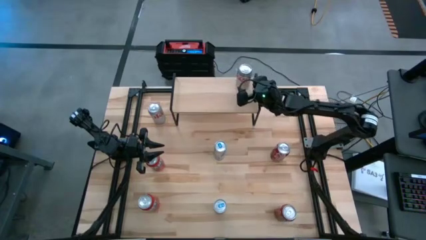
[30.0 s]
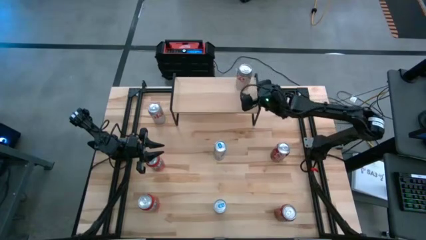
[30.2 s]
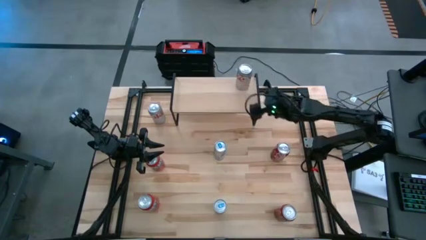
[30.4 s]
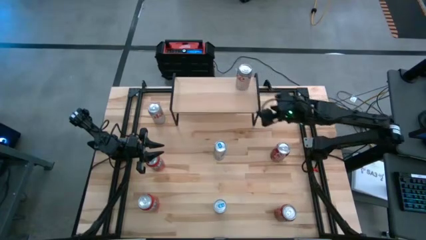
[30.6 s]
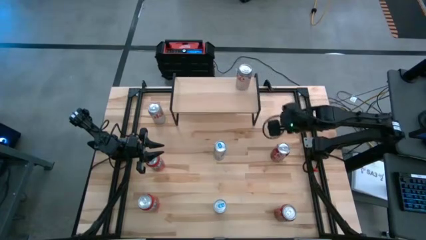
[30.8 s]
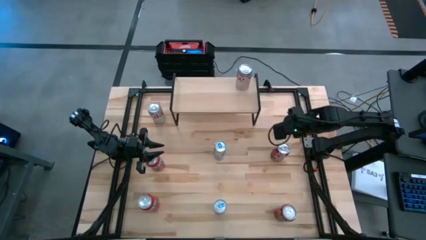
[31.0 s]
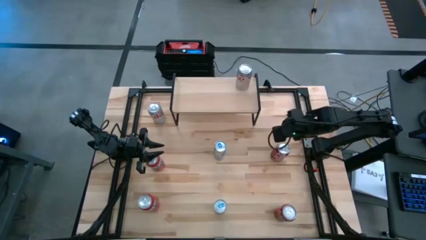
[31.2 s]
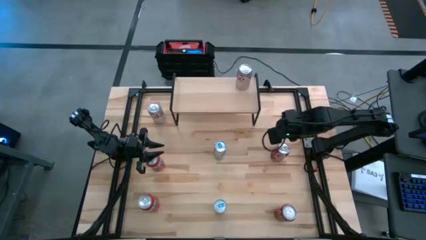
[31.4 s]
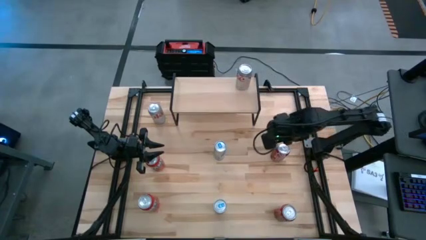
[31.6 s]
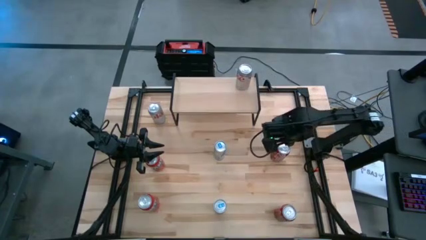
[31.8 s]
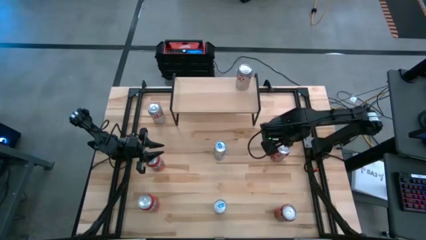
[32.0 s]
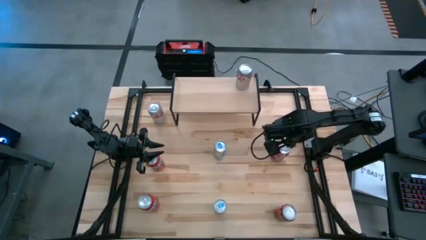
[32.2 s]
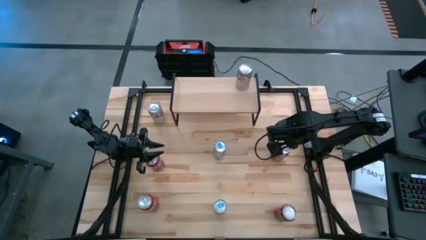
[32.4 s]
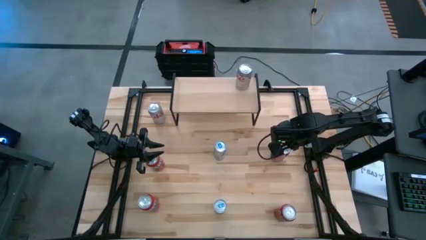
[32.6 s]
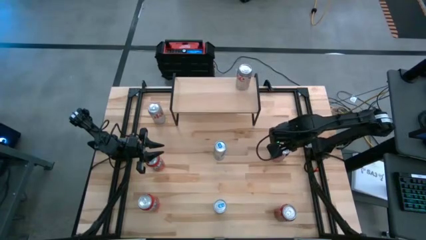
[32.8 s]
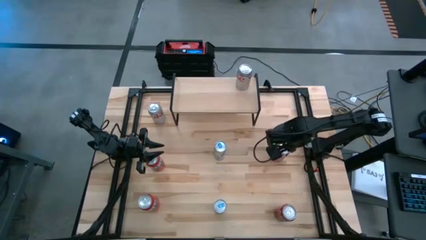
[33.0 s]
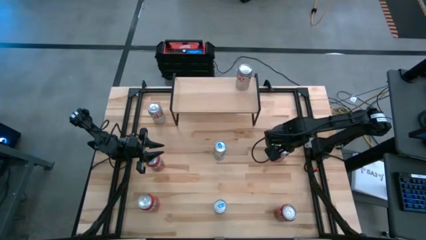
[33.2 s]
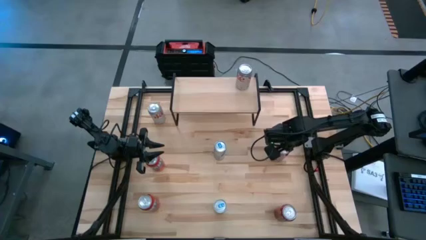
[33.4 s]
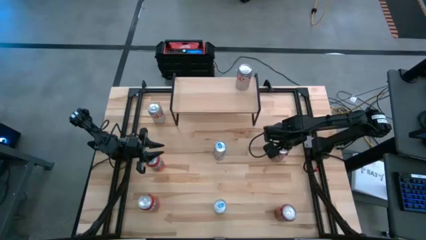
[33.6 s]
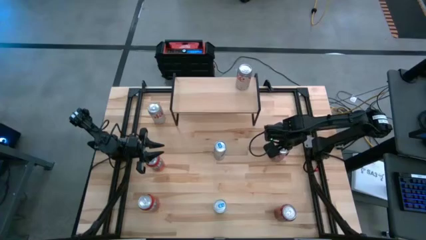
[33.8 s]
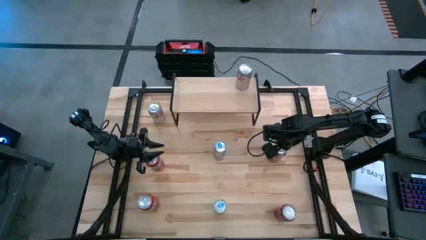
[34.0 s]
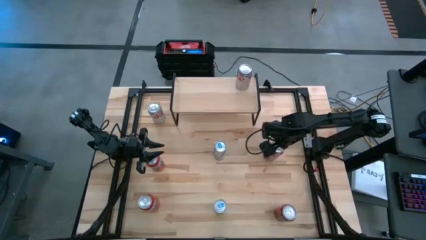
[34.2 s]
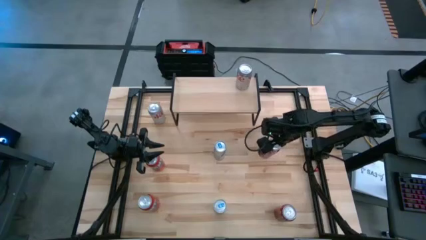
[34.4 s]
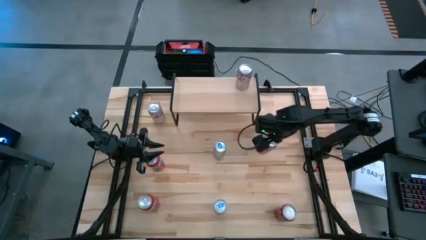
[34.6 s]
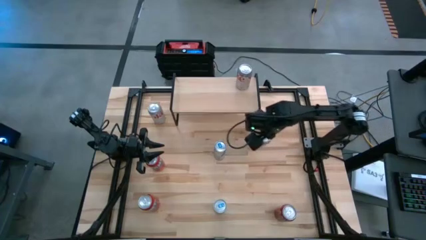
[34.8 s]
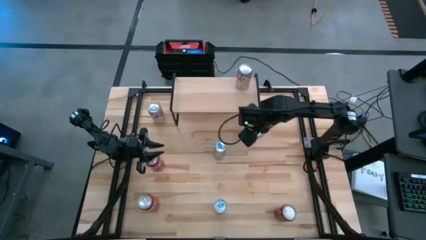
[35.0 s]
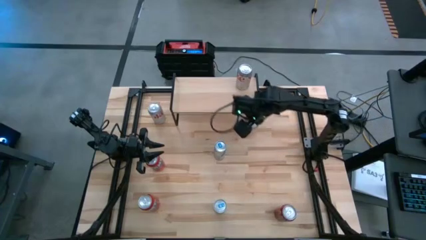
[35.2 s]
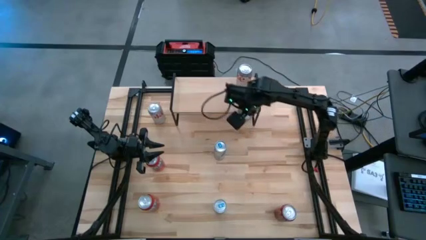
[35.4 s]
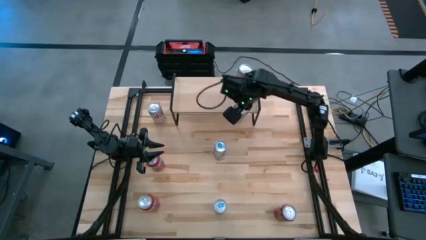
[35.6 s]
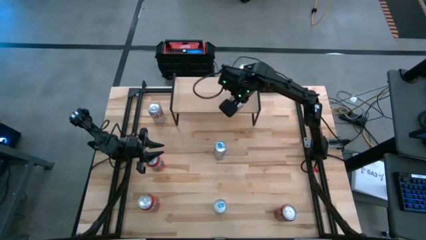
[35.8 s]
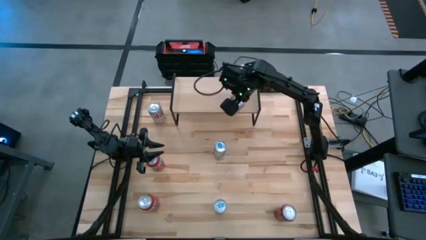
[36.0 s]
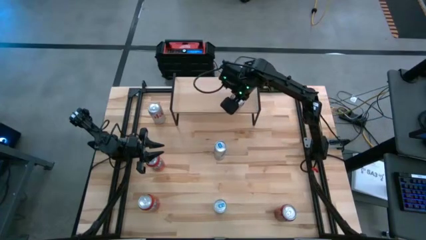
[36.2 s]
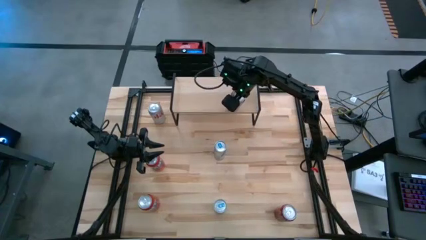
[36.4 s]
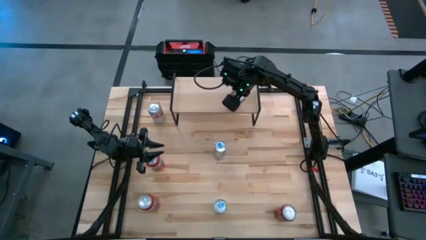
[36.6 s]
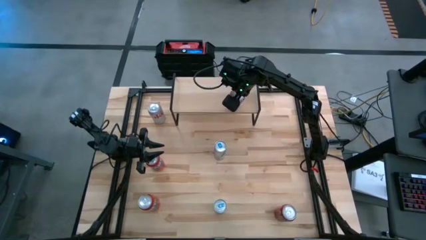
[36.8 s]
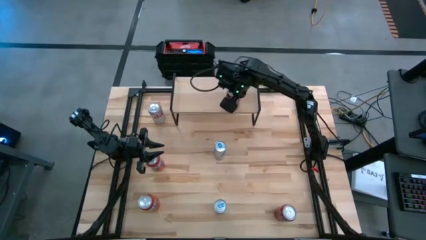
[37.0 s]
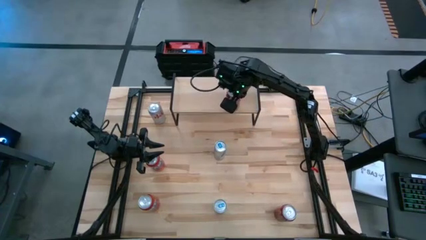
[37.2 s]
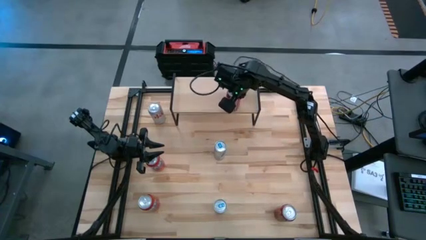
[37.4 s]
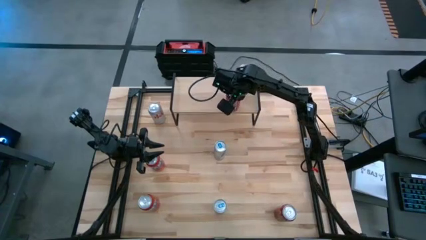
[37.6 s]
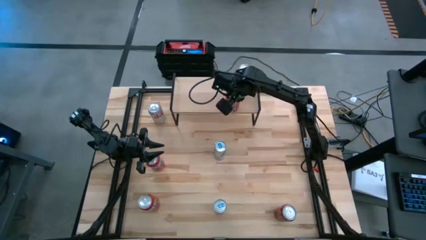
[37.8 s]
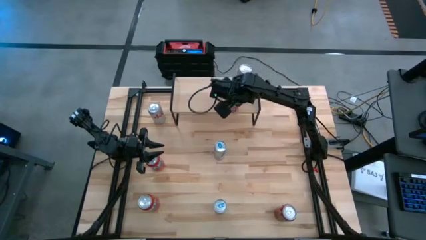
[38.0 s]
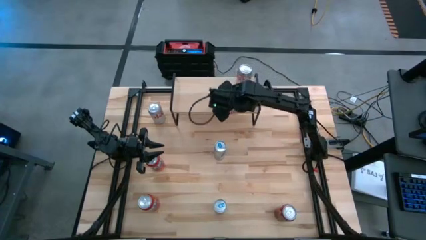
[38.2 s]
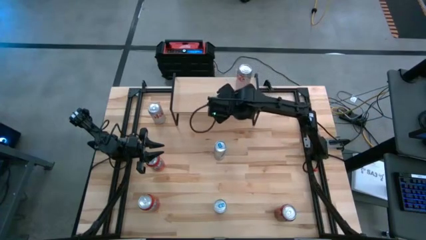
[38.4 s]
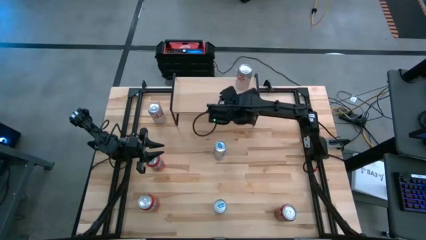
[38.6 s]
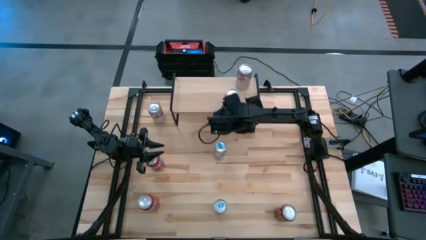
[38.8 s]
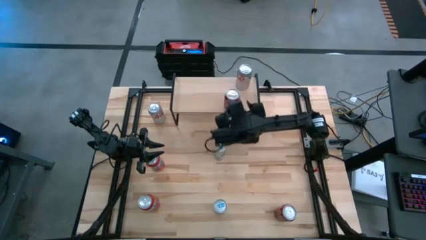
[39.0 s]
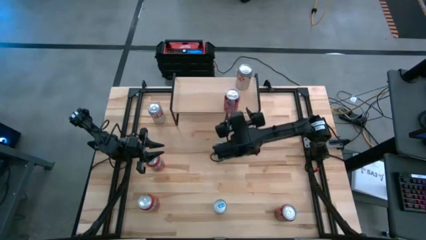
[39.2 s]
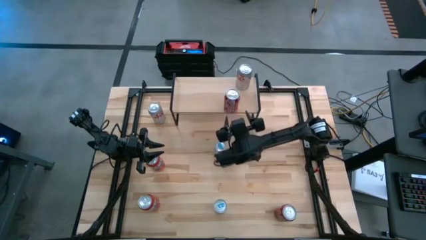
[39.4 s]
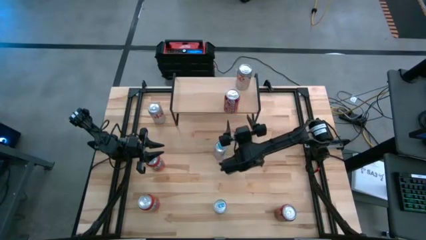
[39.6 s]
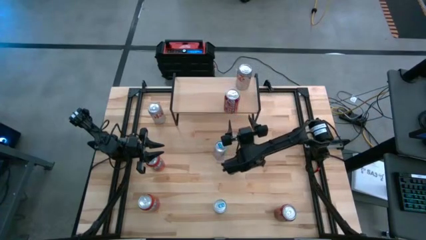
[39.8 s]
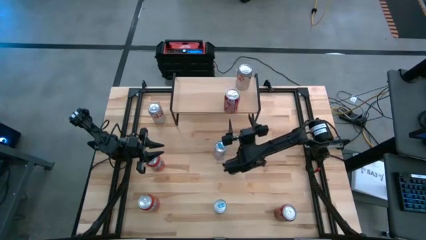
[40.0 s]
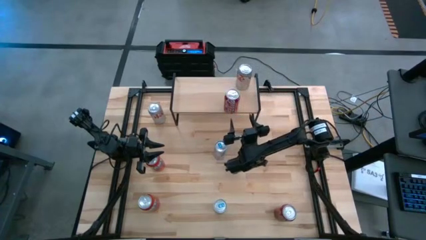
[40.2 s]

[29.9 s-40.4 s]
Task: Place canned beverage on shelf
Put the top red and white soda can on the shelf
